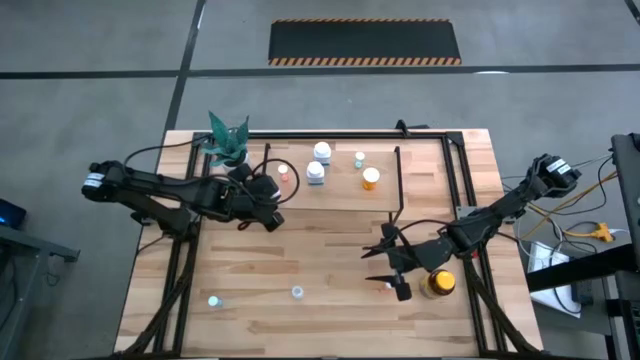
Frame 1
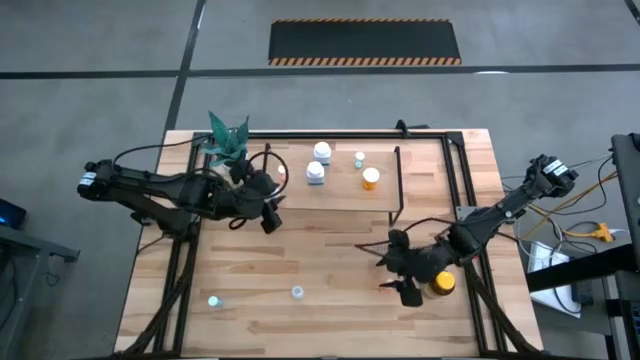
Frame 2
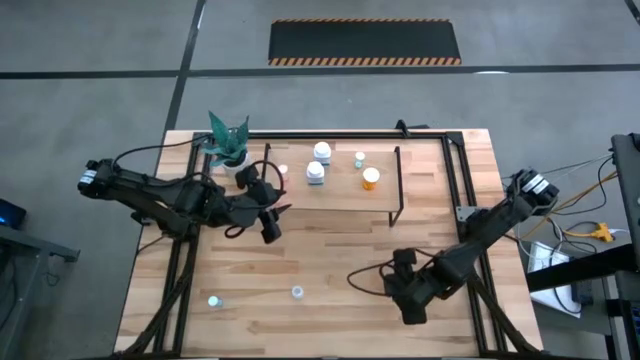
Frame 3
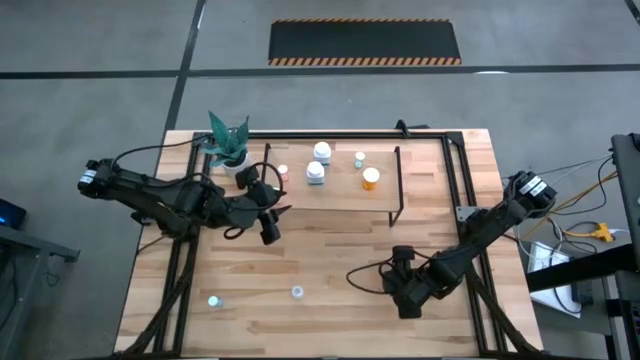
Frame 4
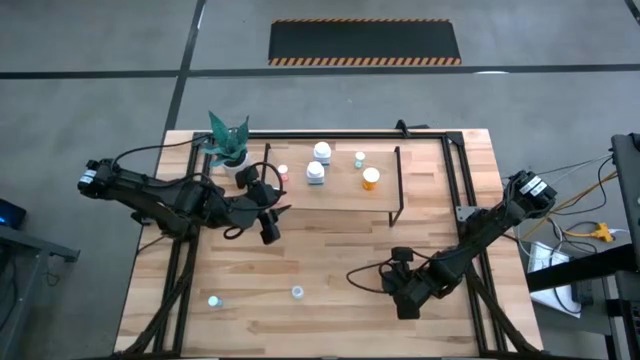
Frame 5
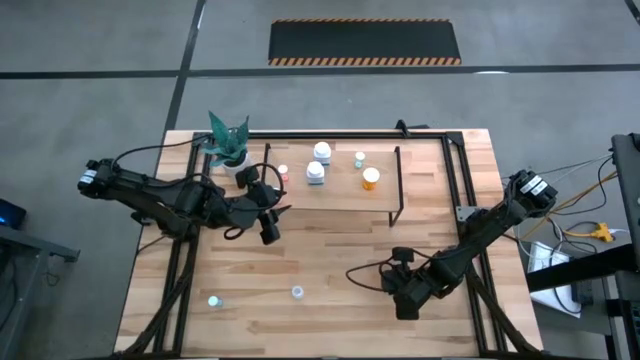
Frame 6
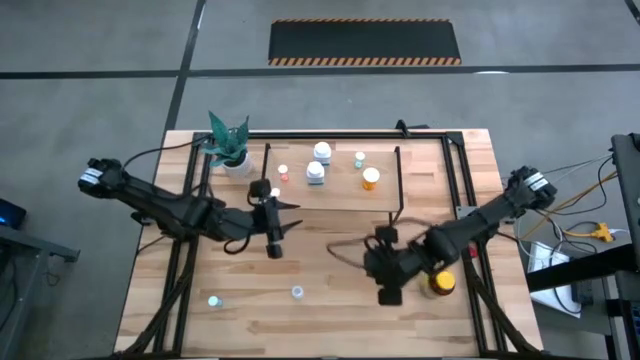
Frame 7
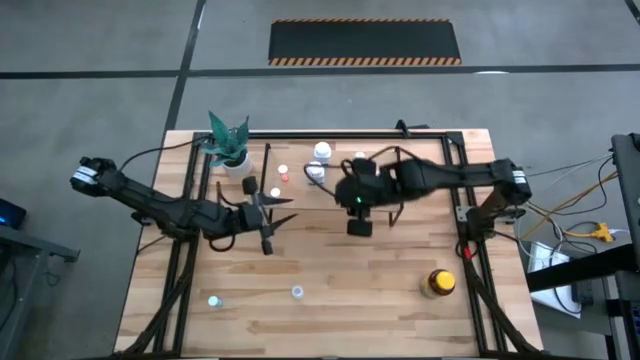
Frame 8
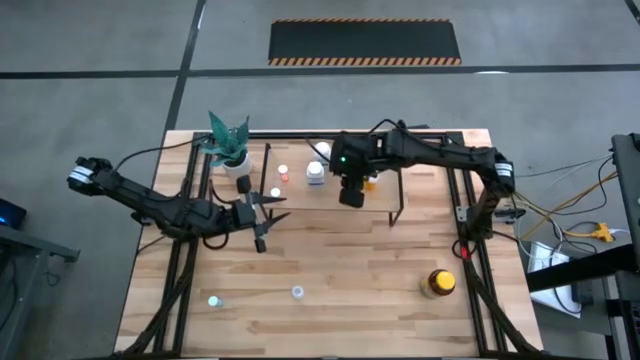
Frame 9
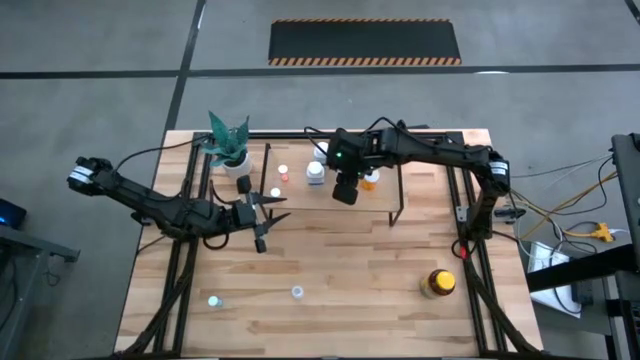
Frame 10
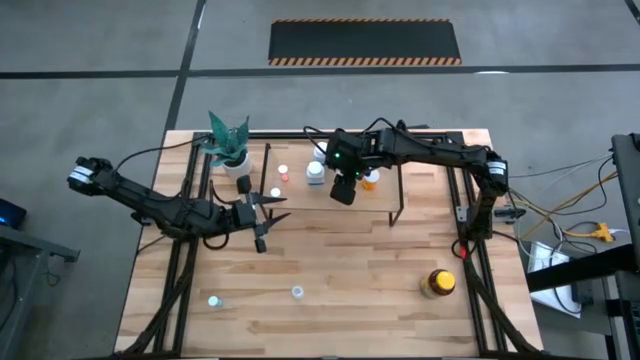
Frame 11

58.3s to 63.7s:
Task: Pick and place medicine bottles onto shelf by color
Put the pink pill bottle on the shelf

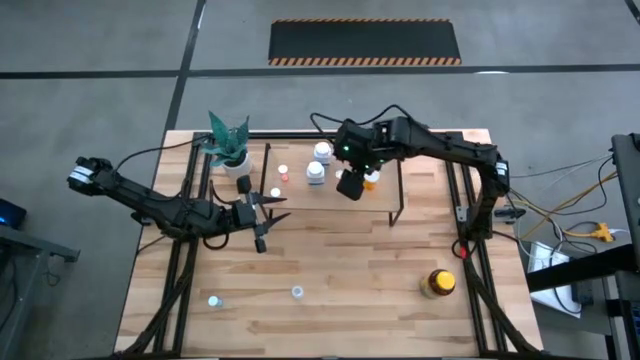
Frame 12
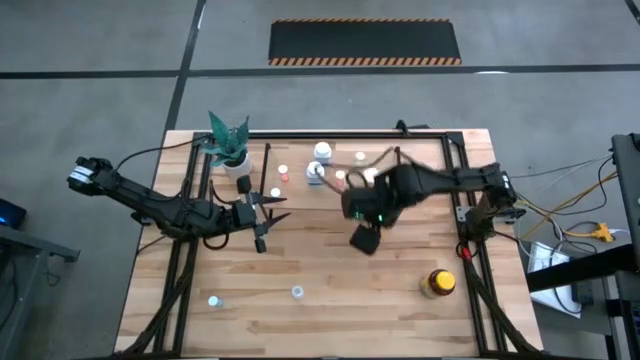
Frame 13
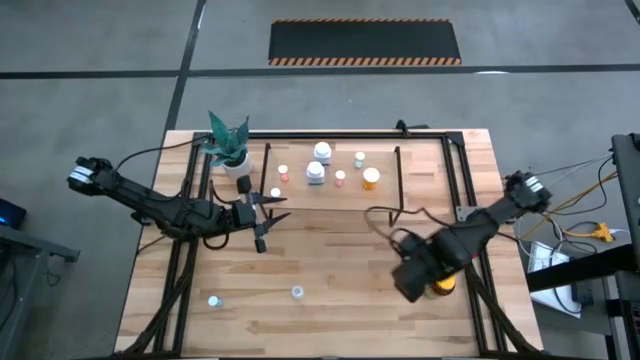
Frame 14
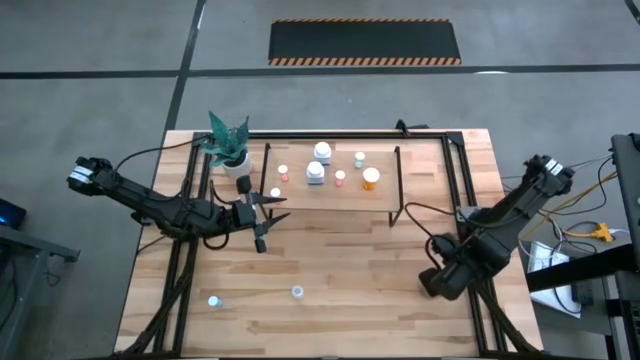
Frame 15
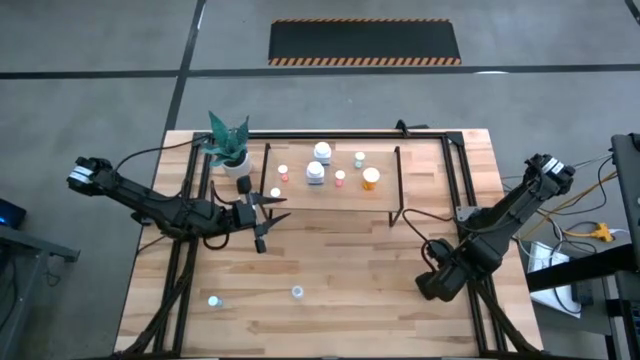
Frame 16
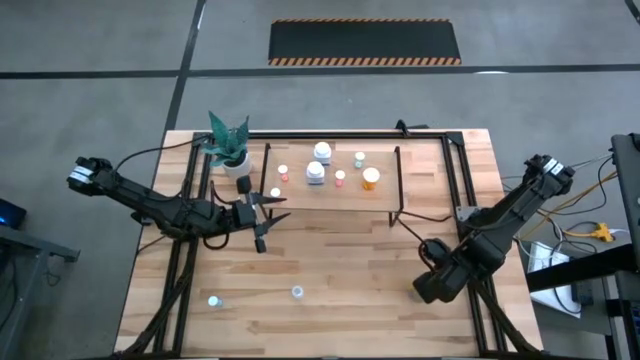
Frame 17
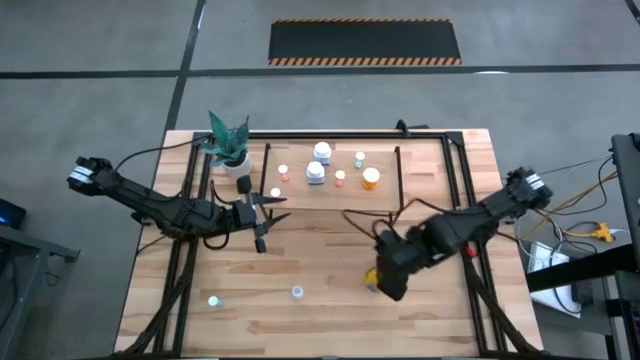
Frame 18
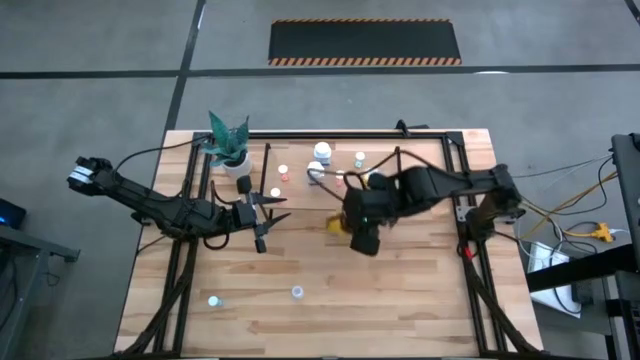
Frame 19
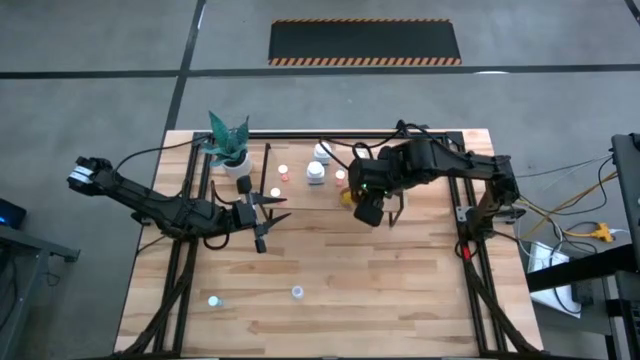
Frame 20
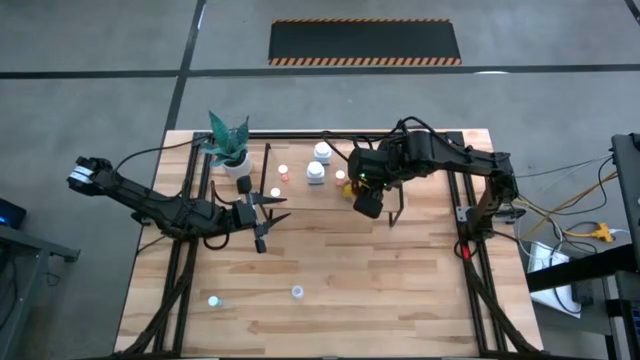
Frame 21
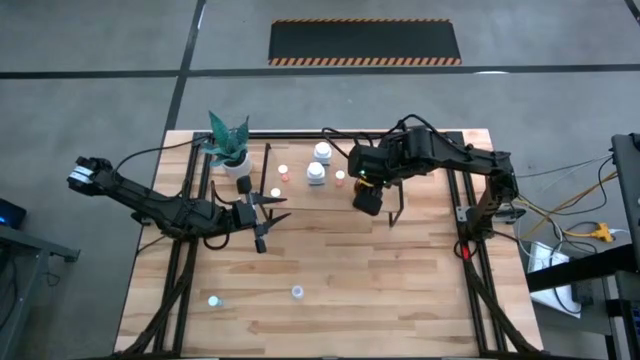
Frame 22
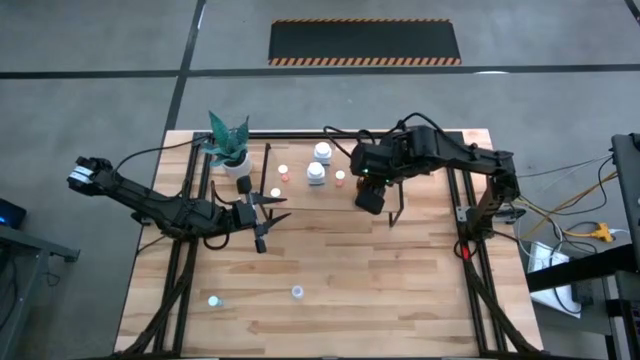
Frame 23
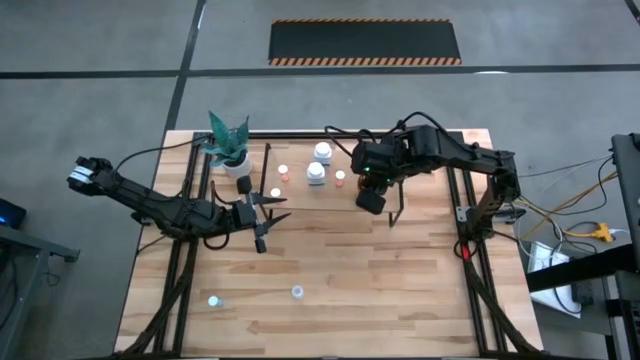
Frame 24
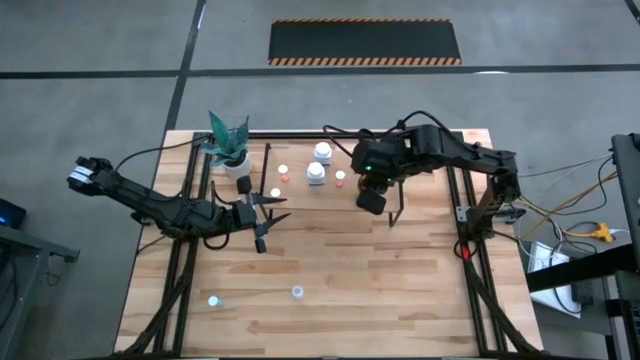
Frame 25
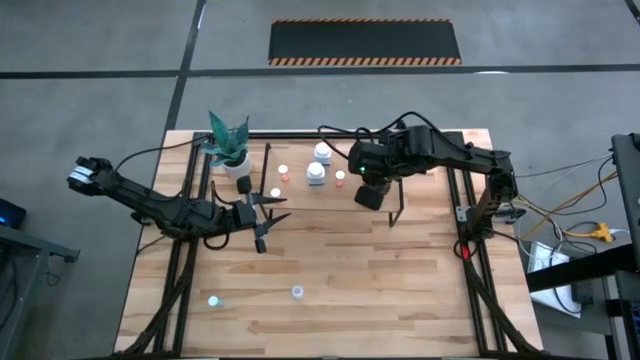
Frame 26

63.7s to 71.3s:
Put the yellow medicine bottle on the shelf

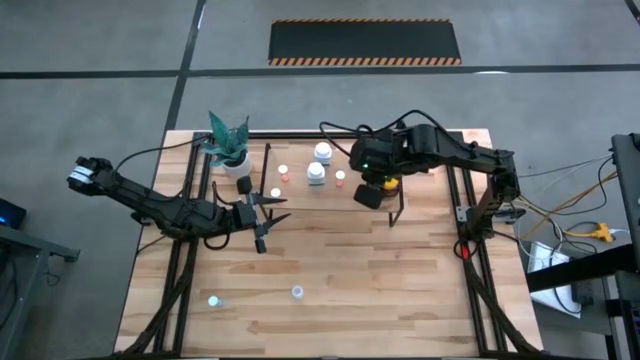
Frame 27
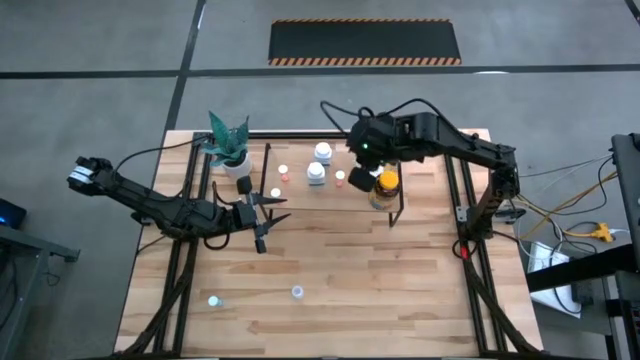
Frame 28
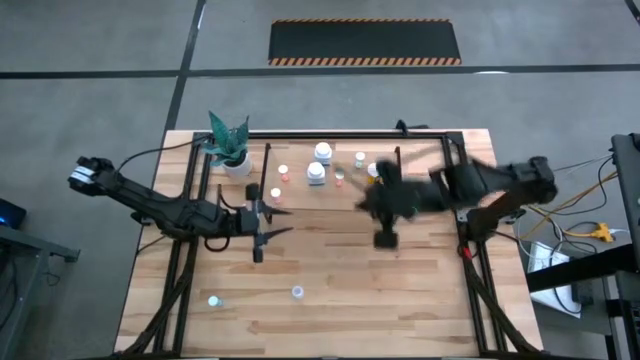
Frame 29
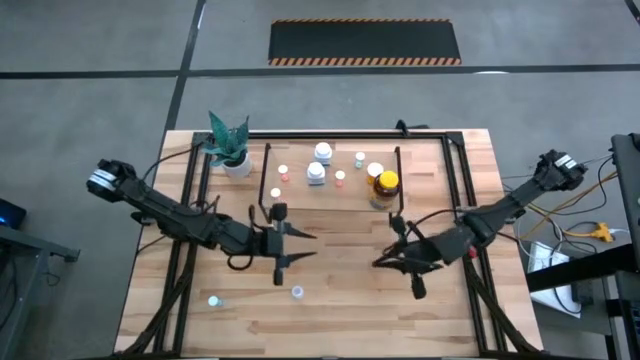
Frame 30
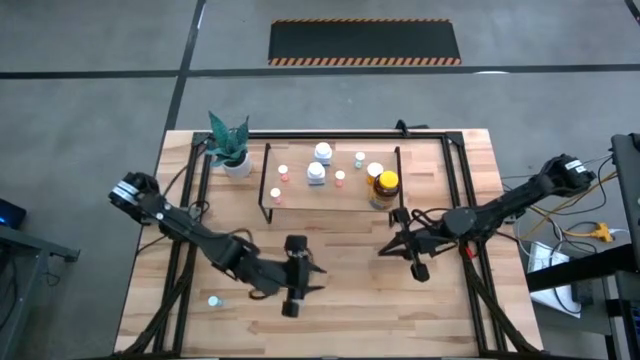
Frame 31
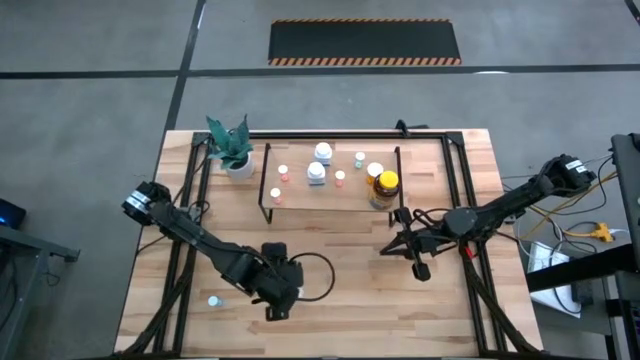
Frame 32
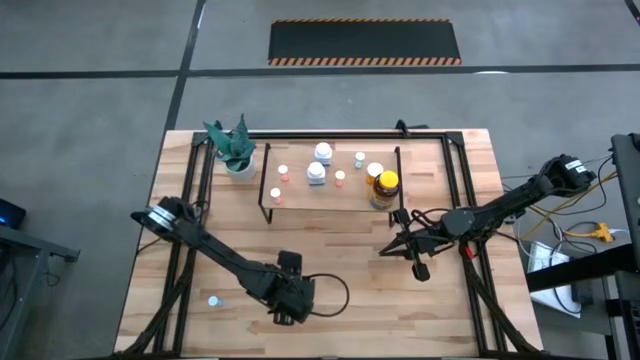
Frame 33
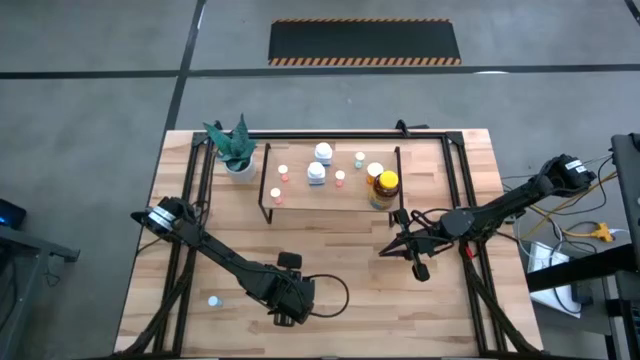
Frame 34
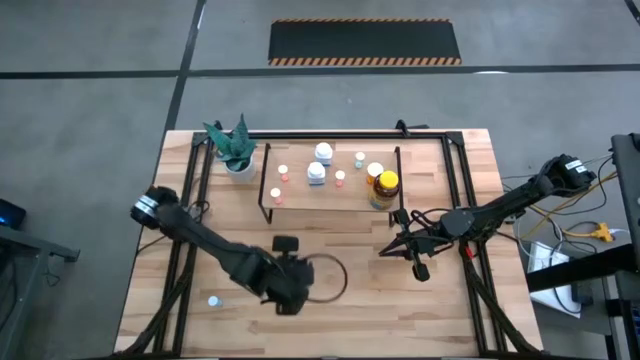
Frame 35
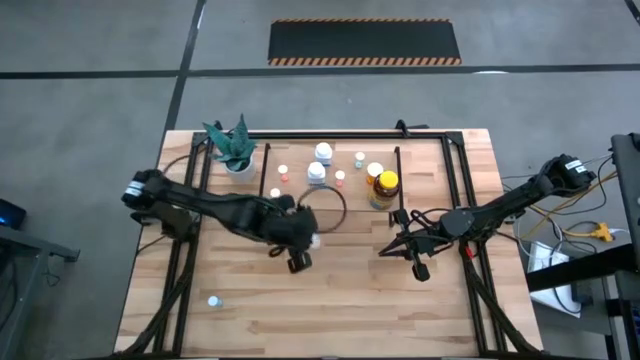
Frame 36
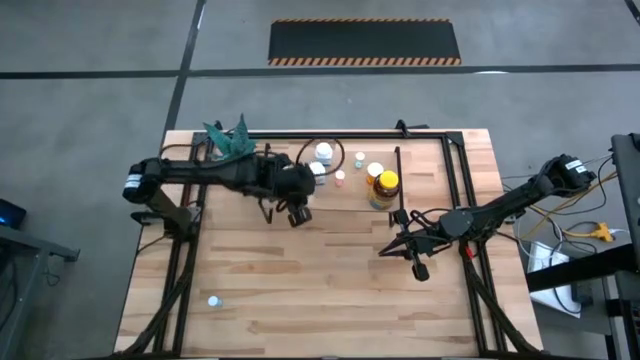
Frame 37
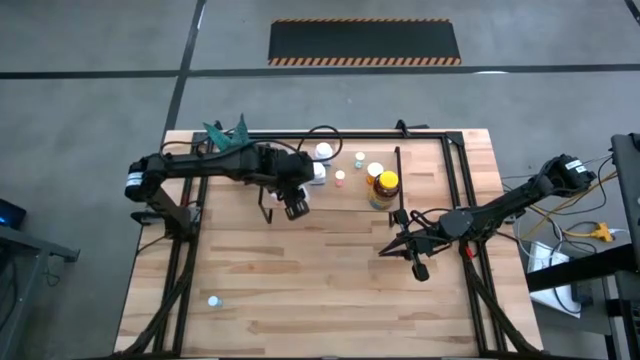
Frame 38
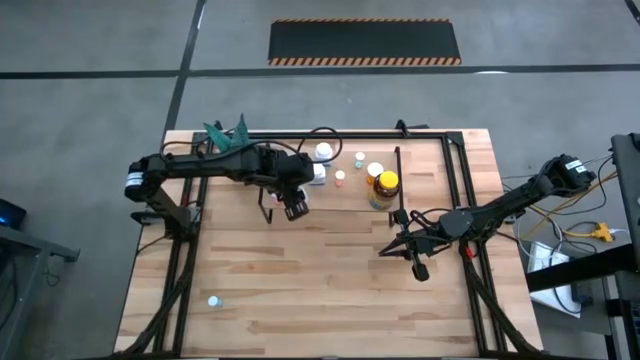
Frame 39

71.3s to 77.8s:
Put the white pill bottle on the shelf

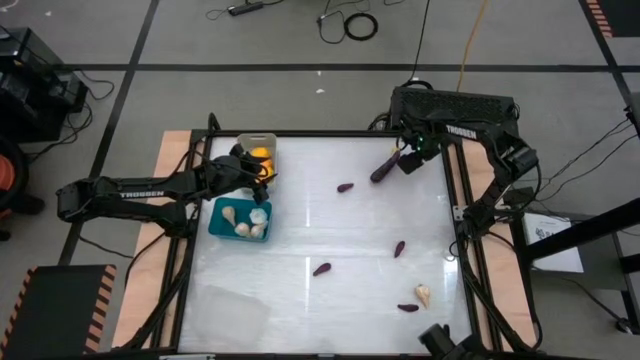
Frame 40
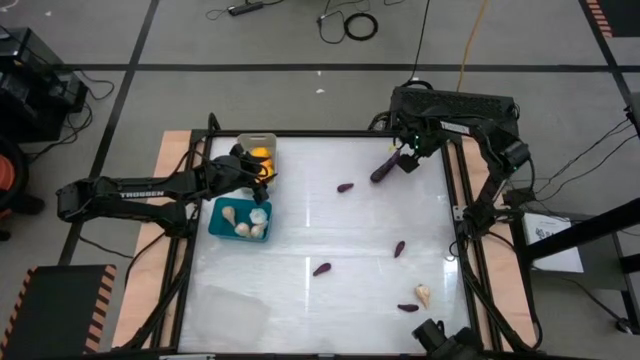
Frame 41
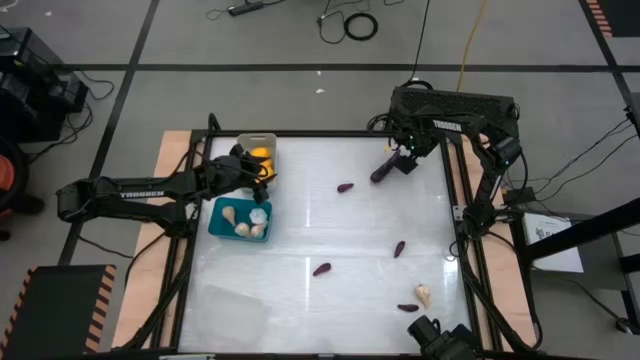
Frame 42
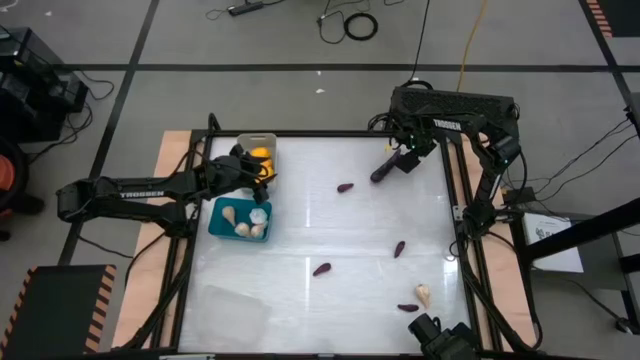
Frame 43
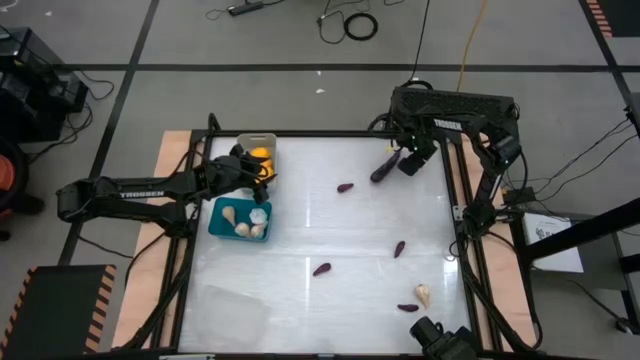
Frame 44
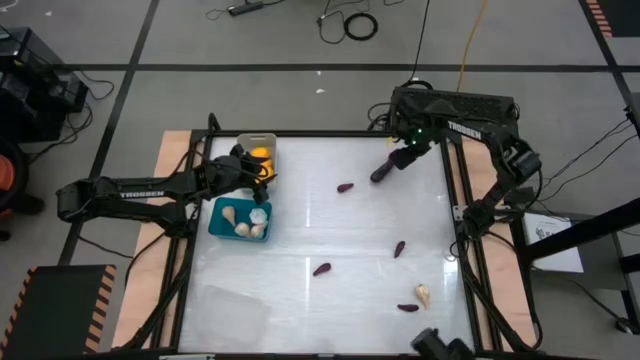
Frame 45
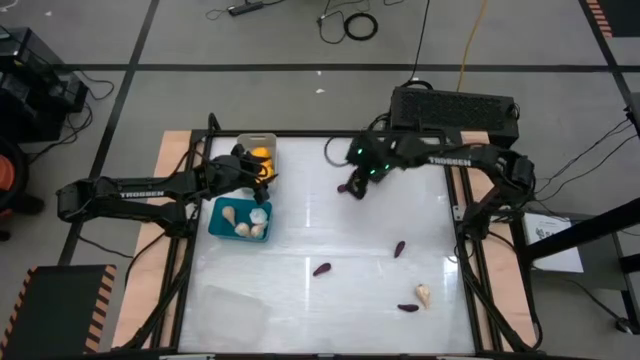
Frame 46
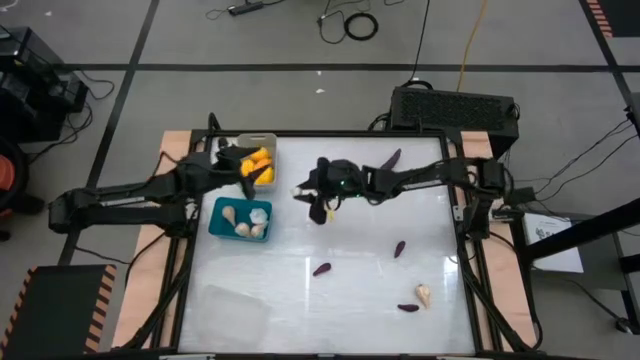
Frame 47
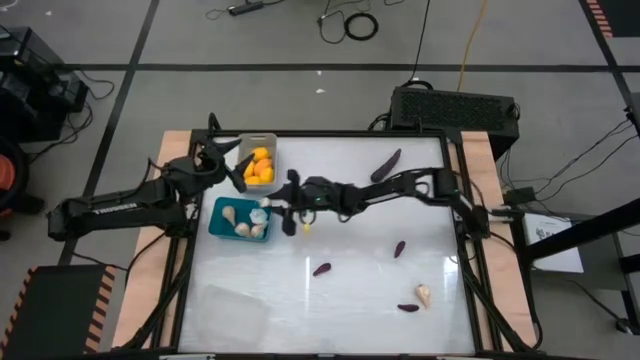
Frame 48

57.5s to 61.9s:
Task: Sort produce into baskets
Put the white garlic into the blue bin
